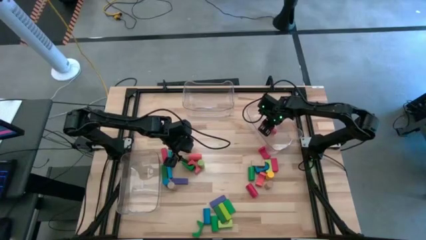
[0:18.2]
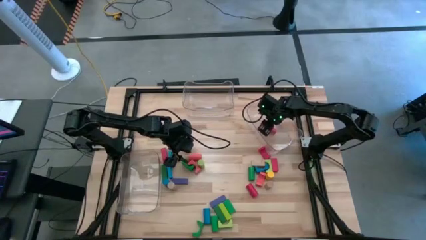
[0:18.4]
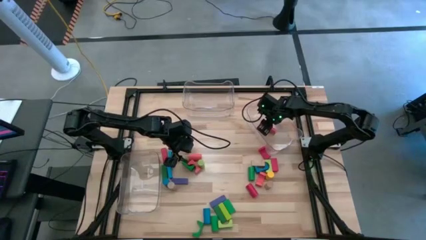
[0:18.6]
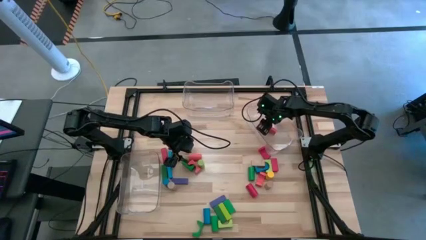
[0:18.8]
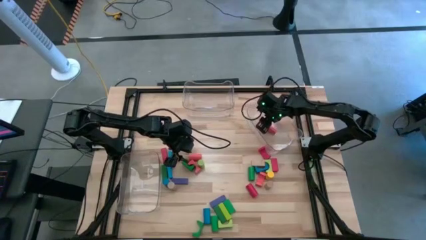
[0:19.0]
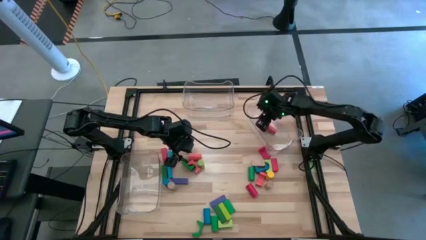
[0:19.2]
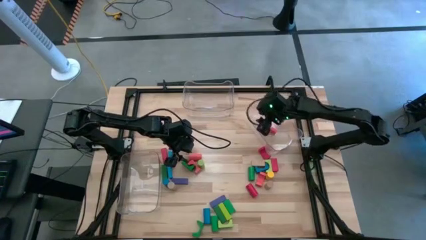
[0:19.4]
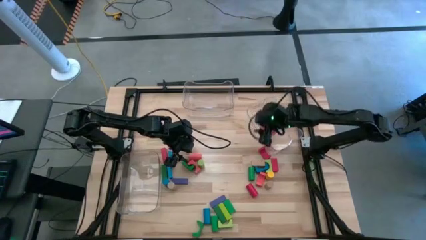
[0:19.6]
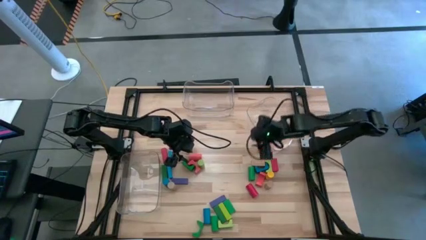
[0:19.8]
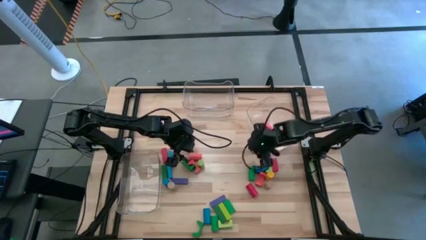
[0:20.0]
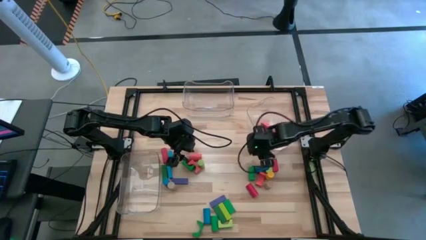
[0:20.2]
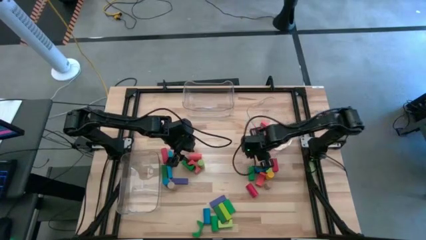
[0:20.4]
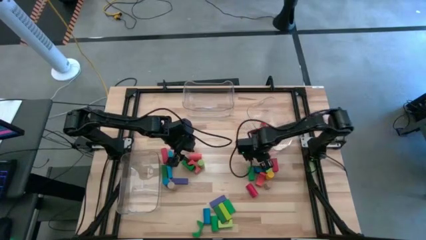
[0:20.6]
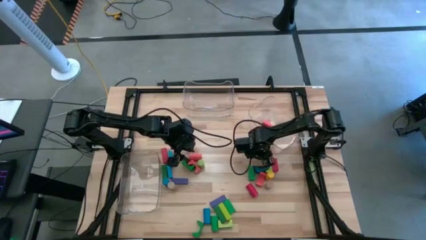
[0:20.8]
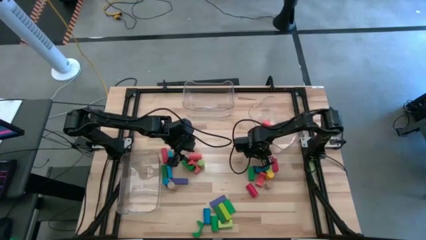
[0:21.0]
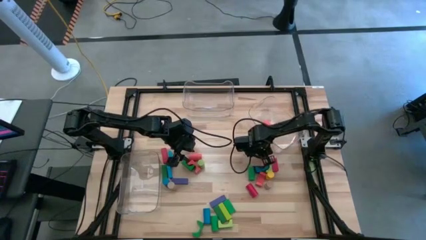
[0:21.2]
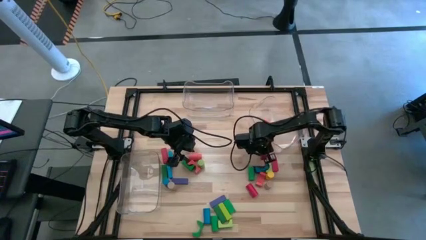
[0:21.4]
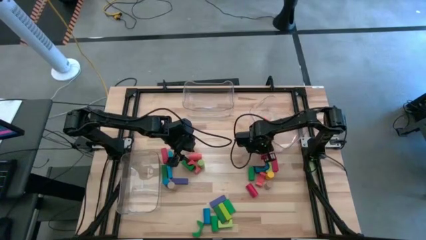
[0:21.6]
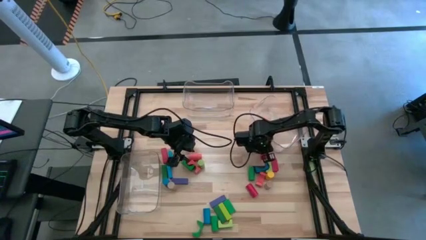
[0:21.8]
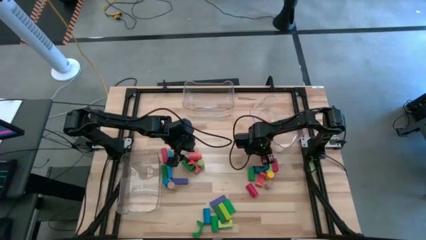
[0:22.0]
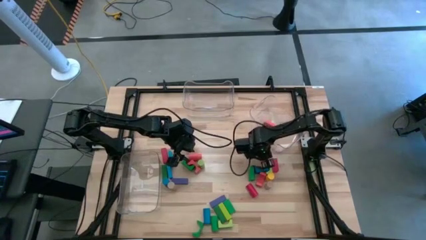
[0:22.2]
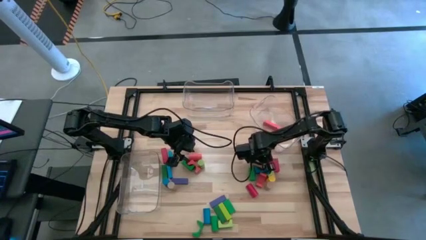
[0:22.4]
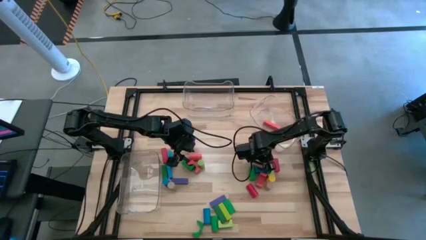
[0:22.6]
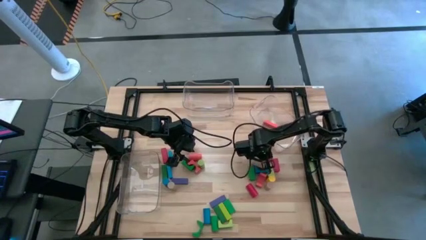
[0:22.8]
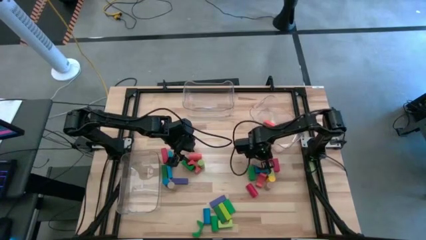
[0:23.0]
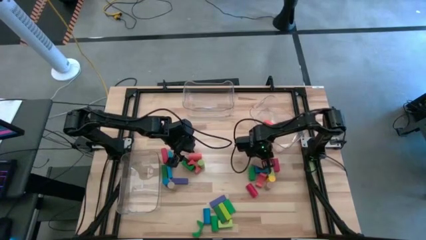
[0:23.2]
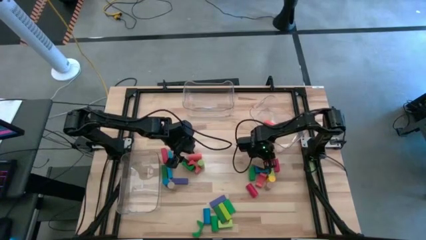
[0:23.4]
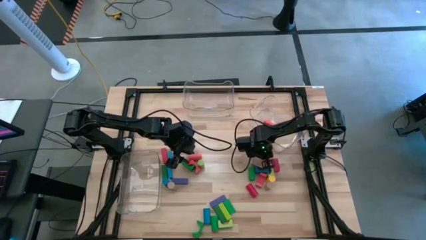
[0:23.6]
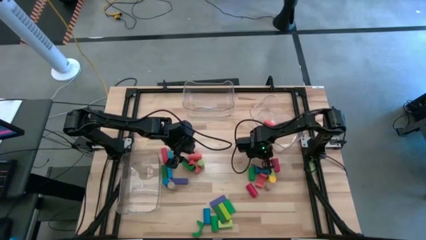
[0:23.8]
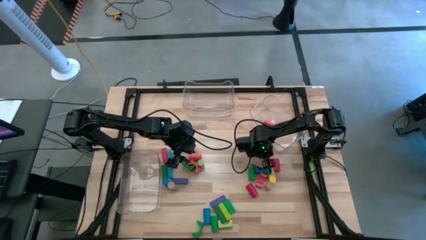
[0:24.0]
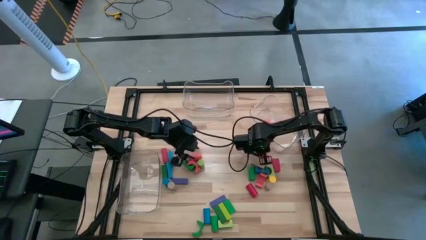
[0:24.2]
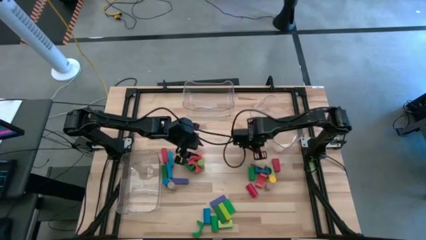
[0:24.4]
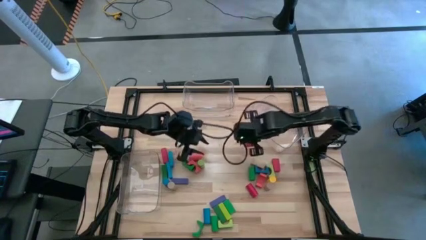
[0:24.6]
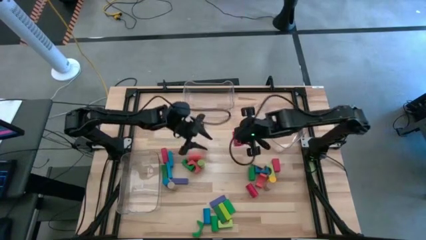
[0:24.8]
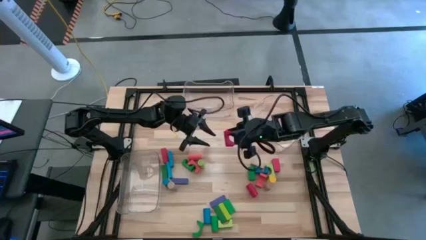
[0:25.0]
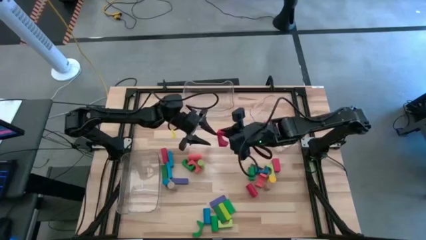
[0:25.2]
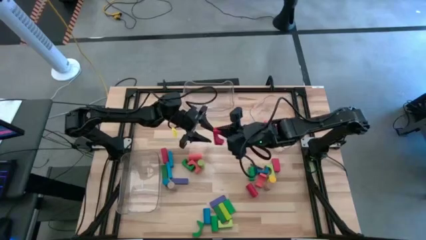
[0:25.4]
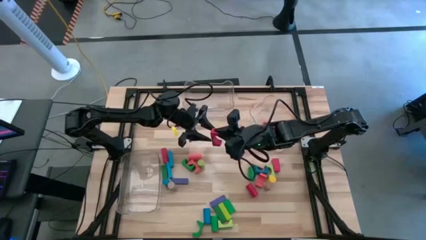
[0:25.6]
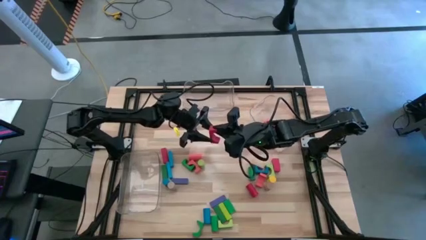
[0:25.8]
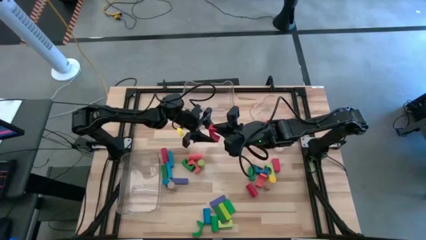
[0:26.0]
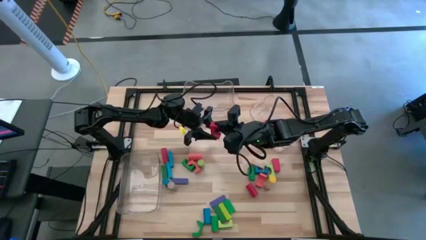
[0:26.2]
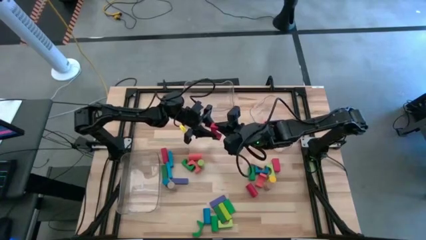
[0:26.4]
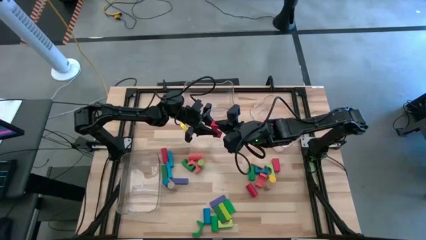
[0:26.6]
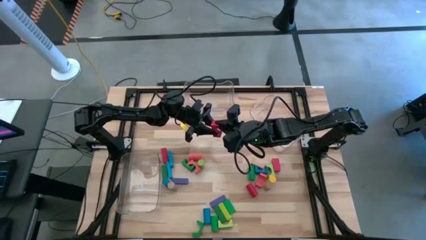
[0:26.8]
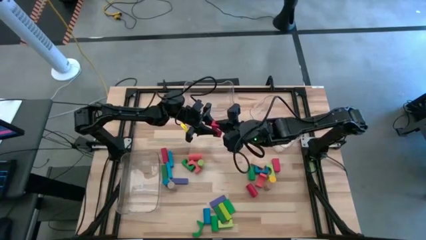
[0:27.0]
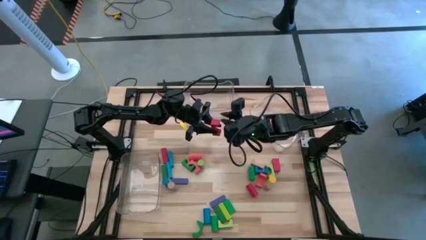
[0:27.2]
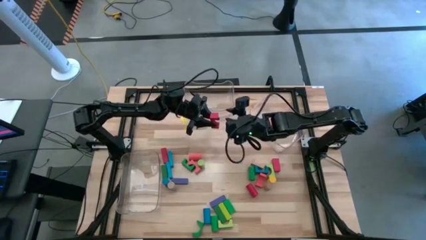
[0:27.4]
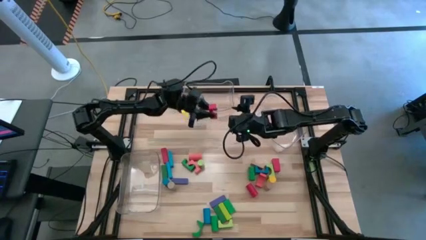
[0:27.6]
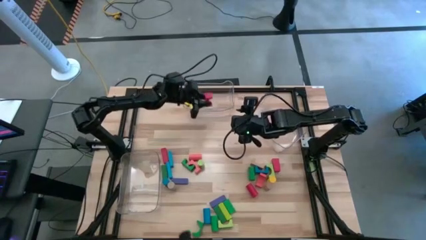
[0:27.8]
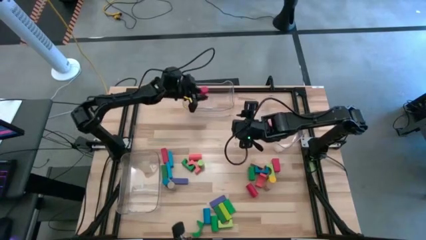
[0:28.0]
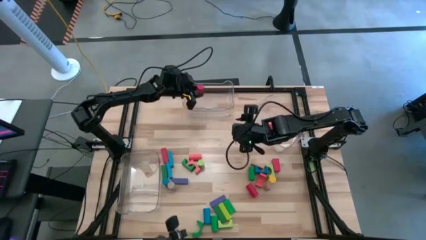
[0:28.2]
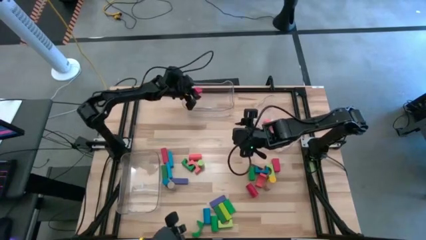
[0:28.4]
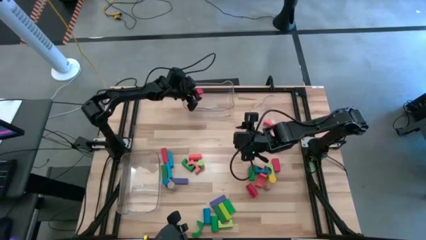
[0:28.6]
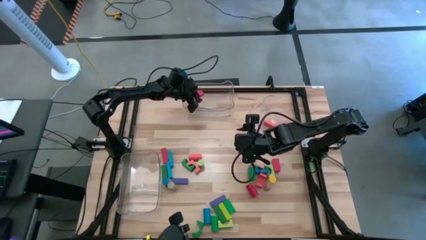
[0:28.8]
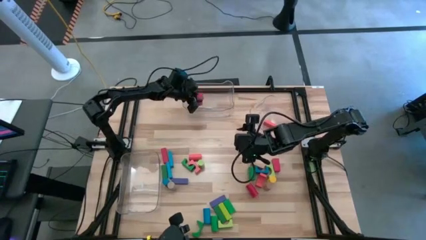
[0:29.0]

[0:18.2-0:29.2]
Task: Sort blocks by size
Put the red arch block into the middle transparent bin
